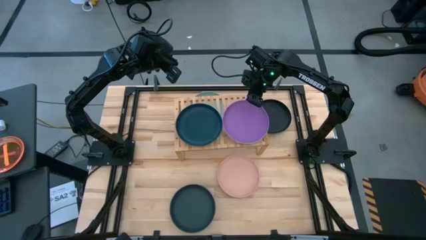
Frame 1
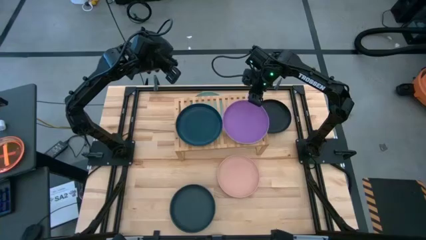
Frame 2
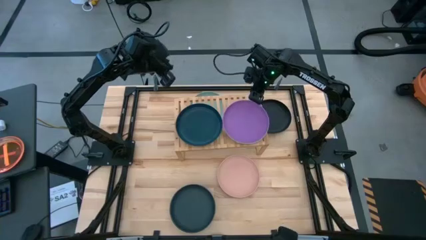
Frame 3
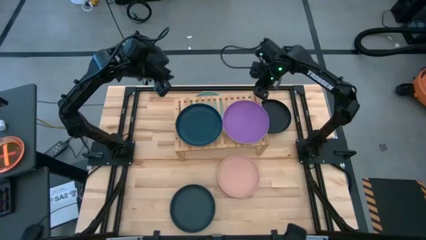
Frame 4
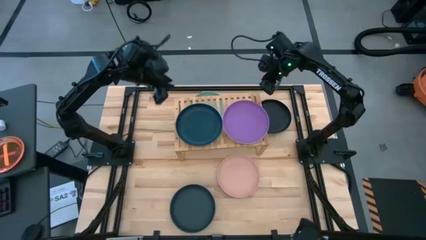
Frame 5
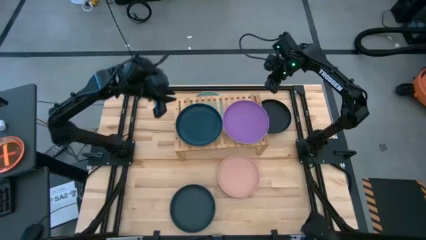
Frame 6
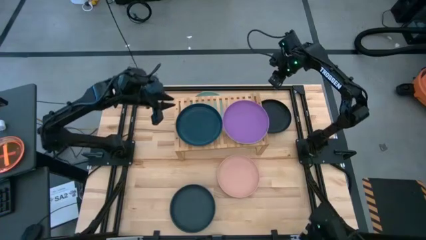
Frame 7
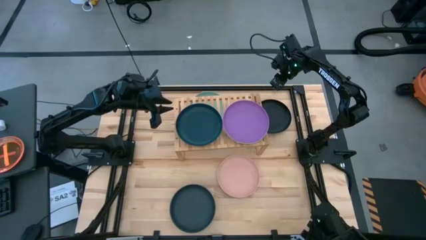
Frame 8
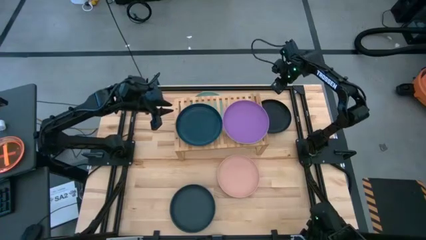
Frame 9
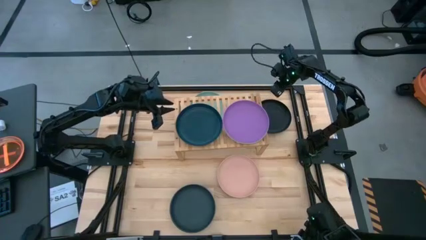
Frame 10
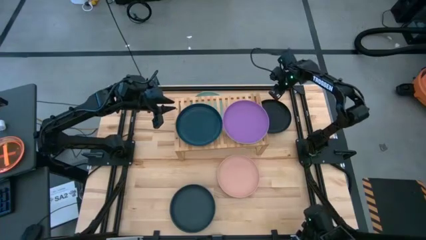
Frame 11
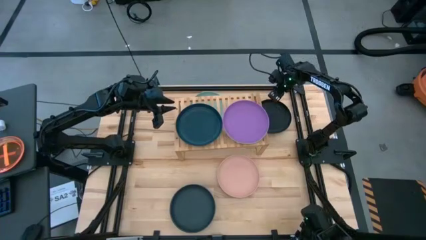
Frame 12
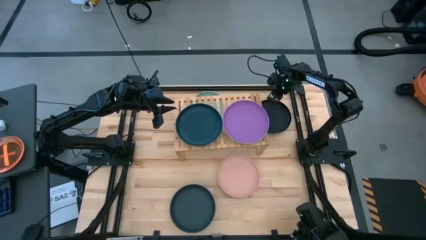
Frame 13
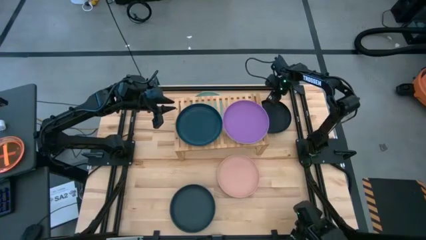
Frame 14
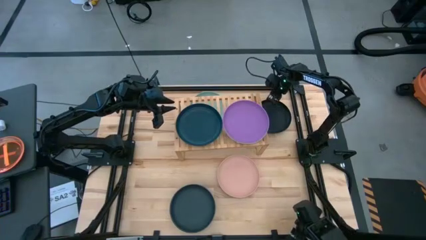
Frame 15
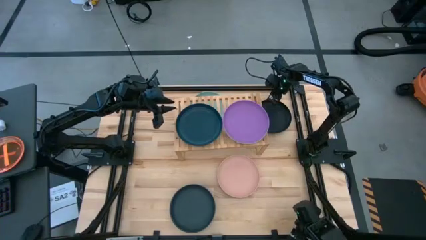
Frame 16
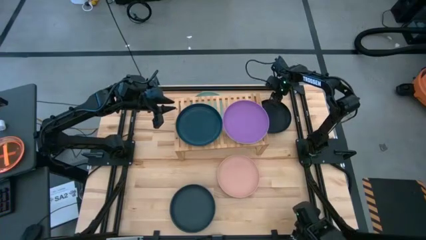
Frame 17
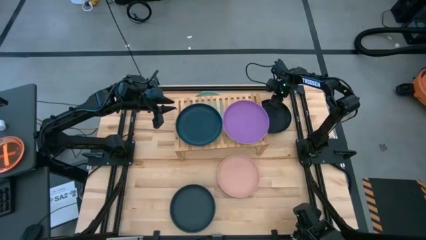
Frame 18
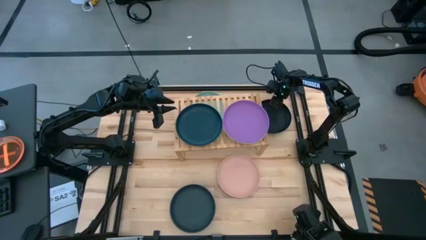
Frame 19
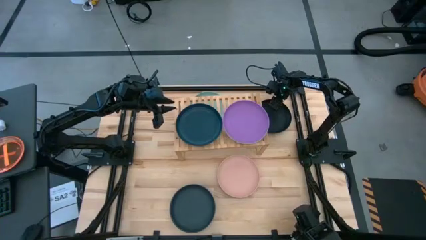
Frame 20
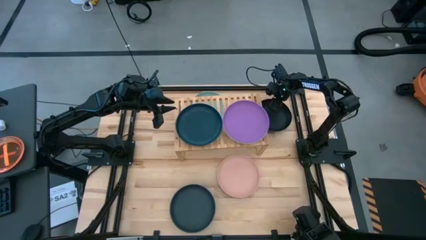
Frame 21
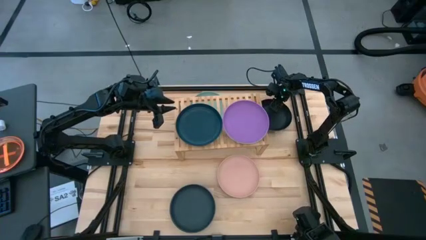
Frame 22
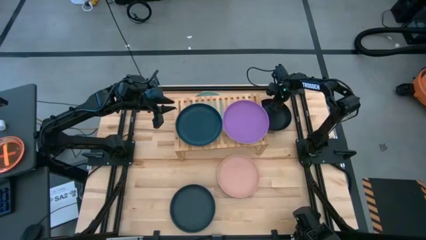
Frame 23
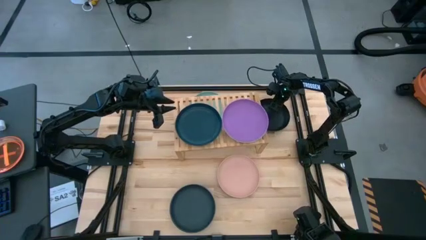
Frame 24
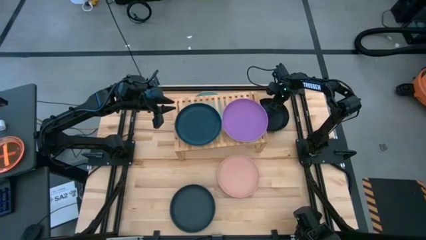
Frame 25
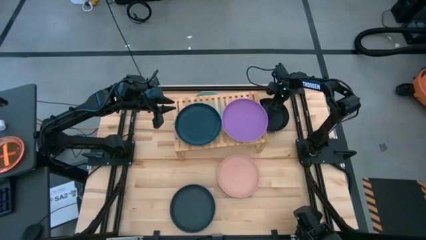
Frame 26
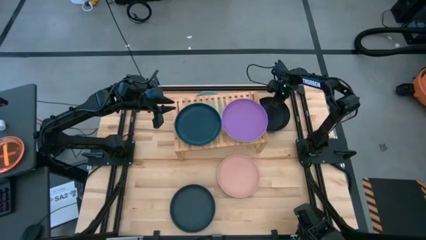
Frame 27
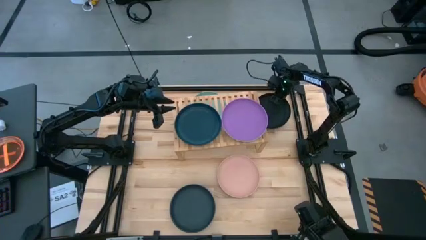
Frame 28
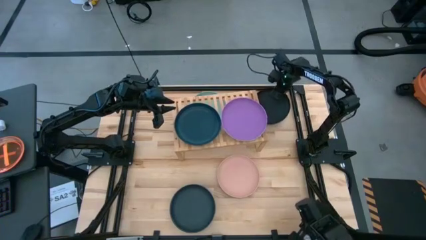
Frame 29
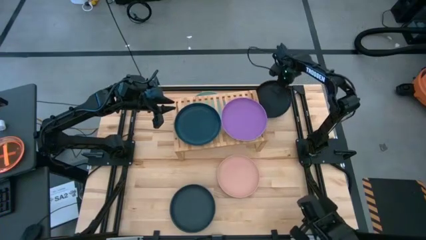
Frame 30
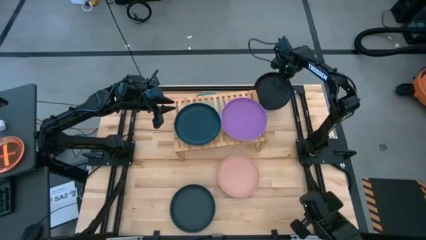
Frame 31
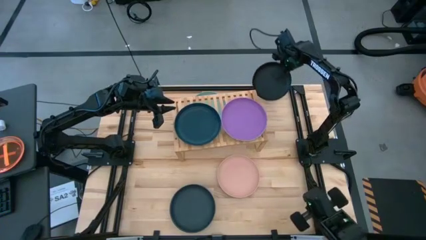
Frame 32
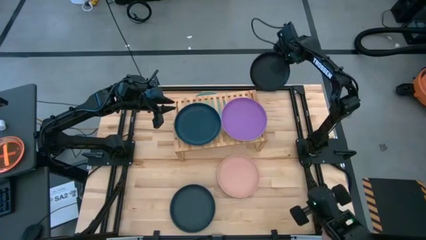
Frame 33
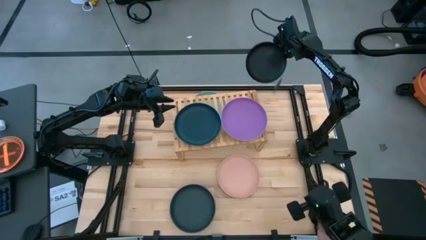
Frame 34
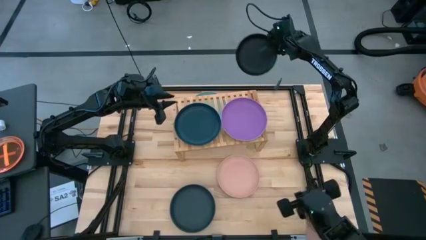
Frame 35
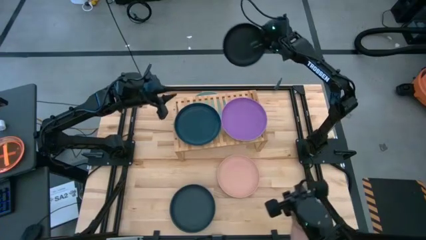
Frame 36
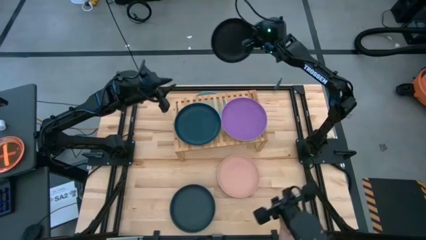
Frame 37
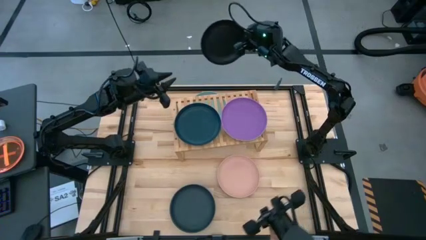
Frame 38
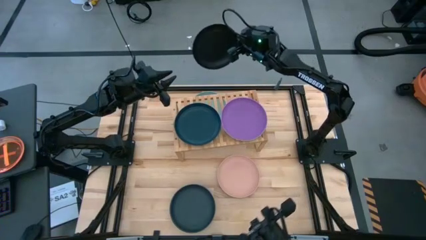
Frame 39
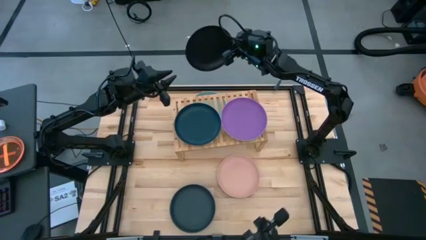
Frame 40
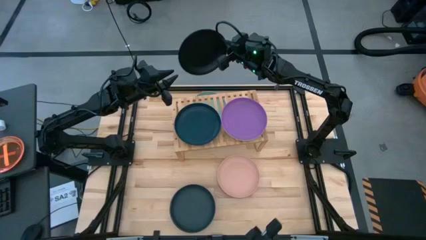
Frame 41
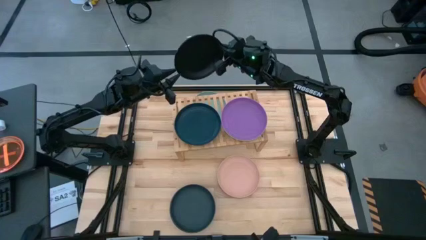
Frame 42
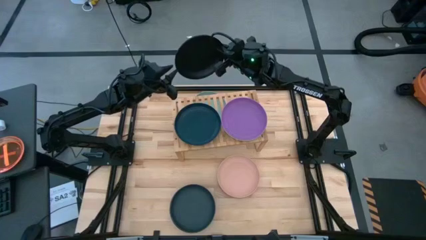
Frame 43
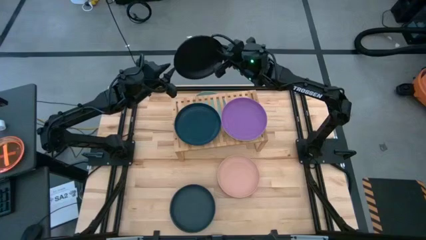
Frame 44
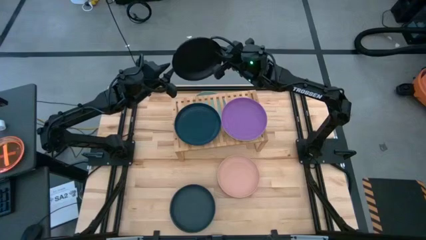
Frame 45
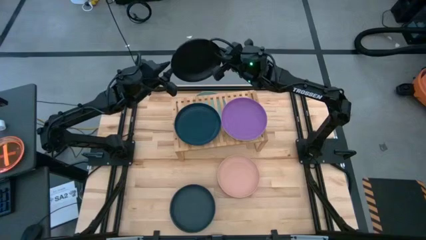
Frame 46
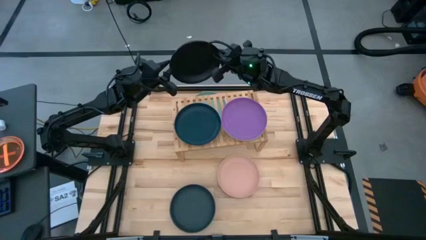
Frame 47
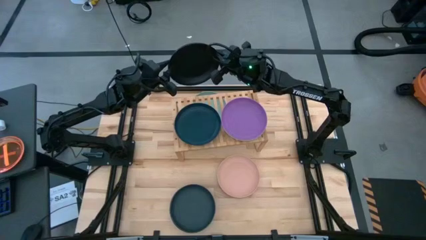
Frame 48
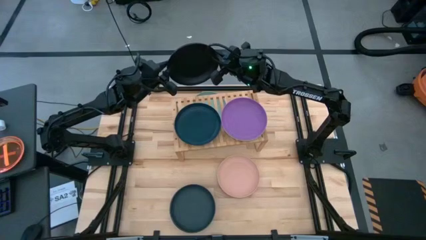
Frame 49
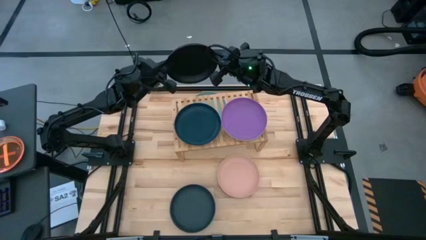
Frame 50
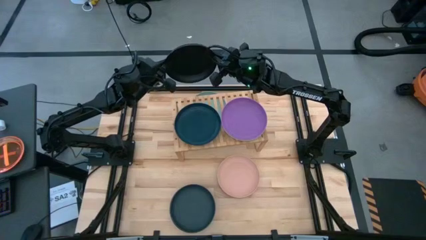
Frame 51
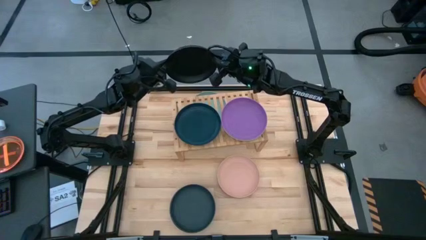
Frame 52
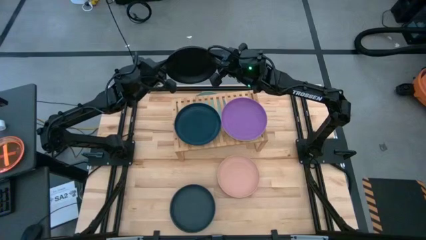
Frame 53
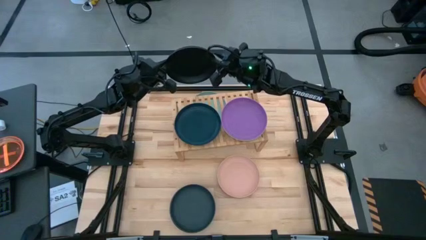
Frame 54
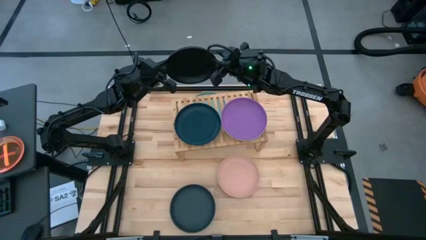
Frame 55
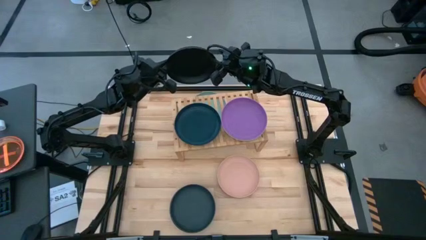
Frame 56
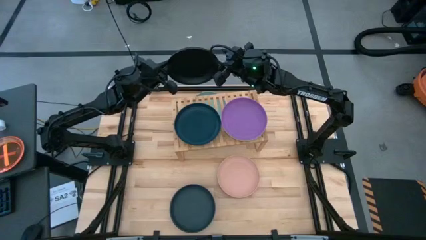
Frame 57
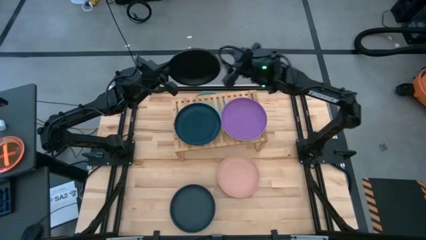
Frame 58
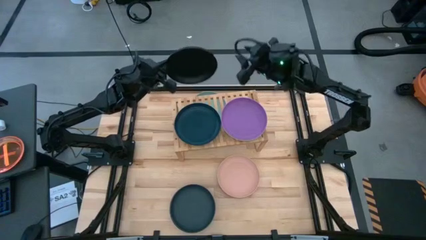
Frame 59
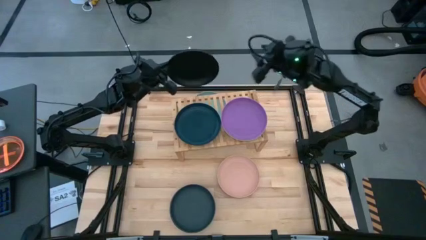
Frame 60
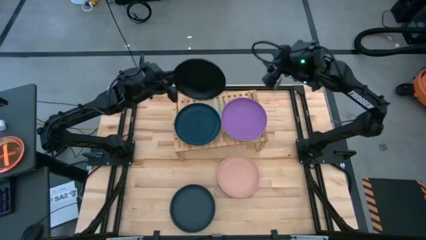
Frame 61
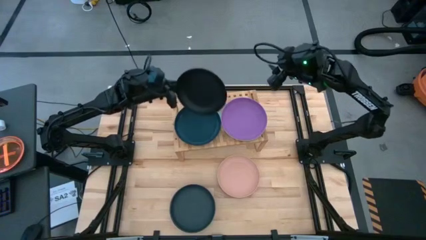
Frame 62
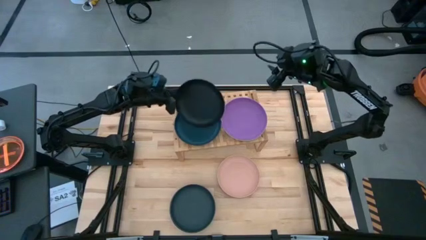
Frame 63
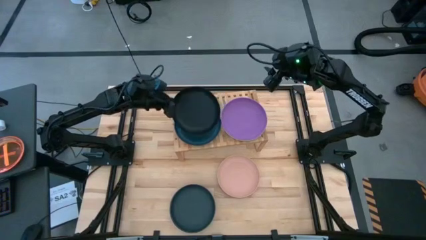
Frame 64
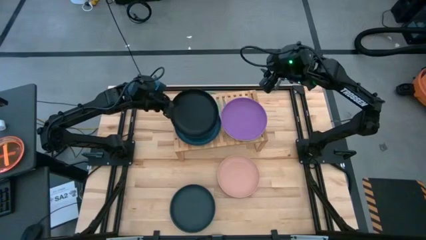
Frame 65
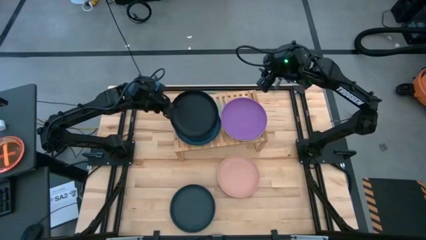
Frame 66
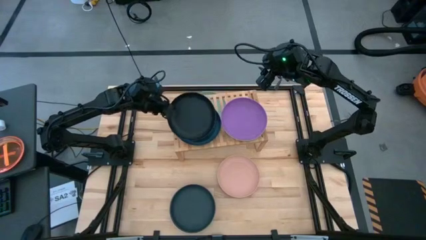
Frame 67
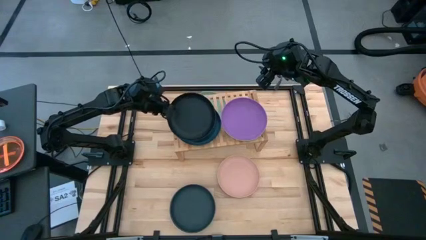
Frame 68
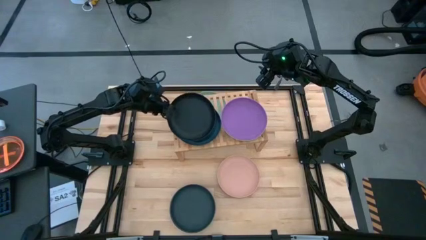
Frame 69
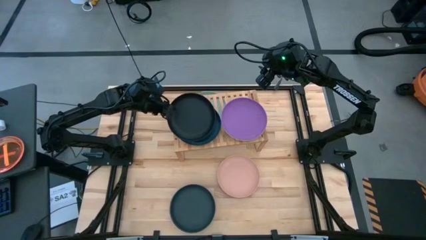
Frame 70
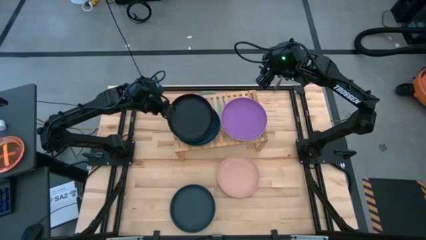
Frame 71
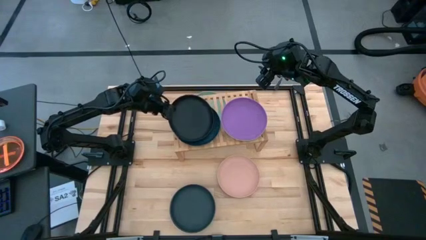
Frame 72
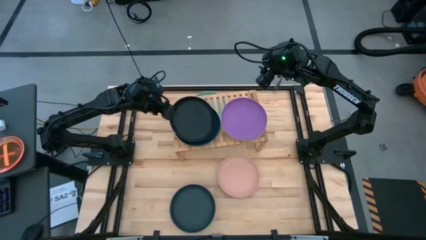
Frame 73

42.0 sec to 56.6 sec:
Task: Place and stack plates onto a shelf
Stack the top black plate on top of the black plate on the shelf

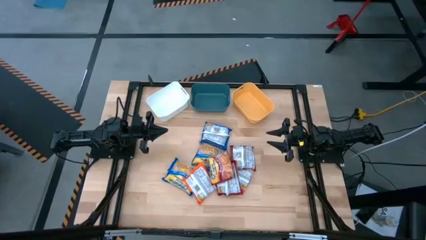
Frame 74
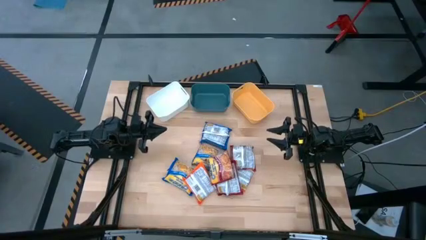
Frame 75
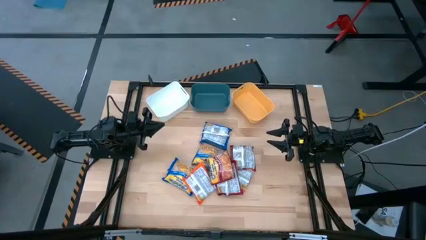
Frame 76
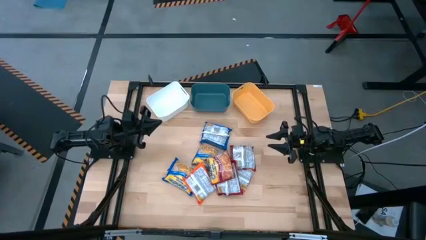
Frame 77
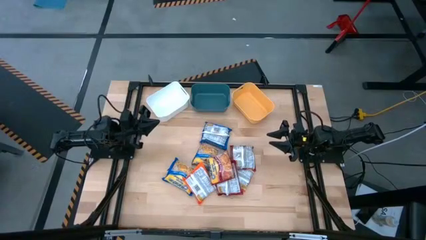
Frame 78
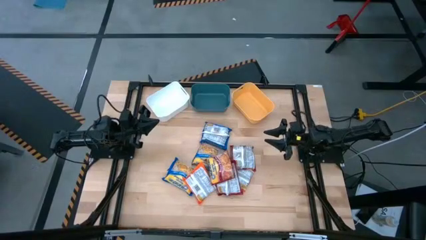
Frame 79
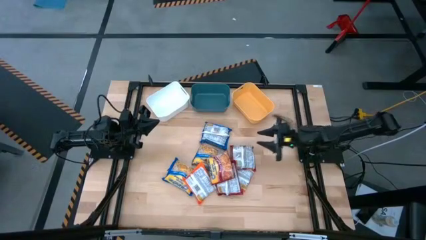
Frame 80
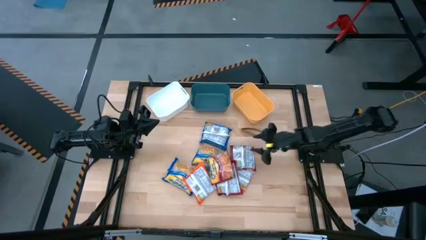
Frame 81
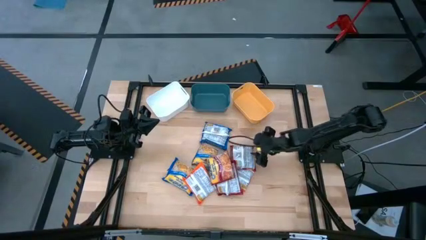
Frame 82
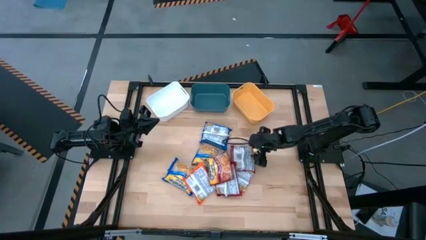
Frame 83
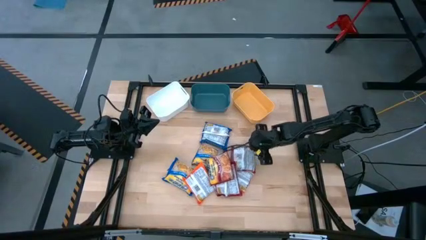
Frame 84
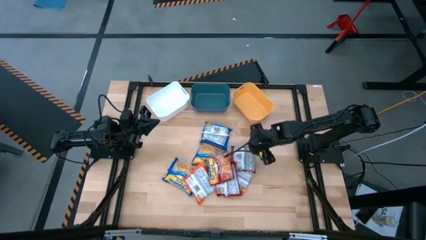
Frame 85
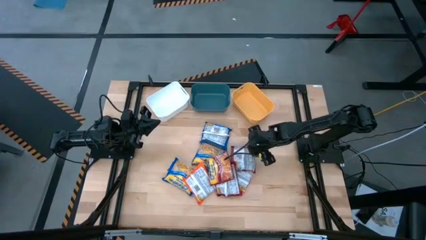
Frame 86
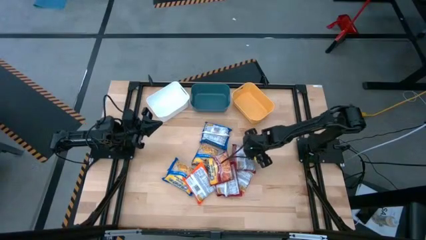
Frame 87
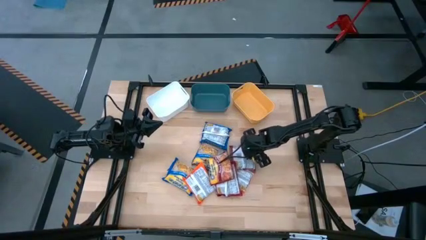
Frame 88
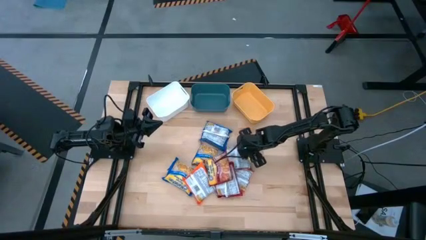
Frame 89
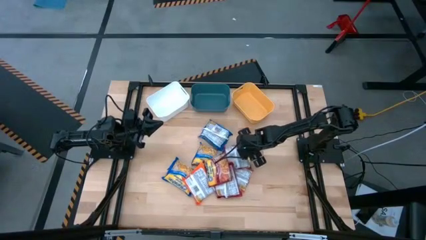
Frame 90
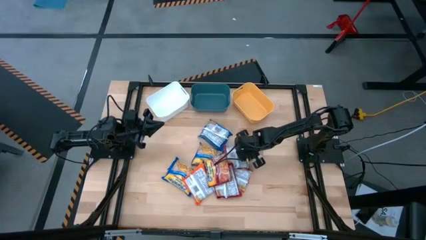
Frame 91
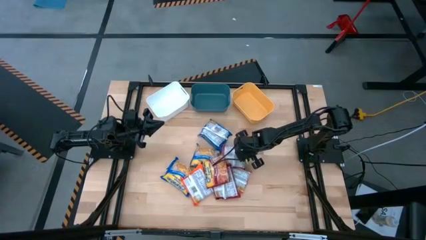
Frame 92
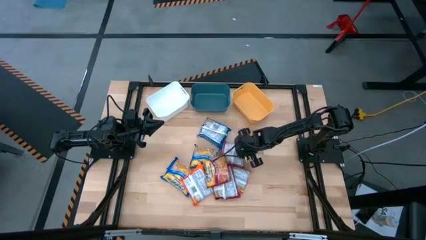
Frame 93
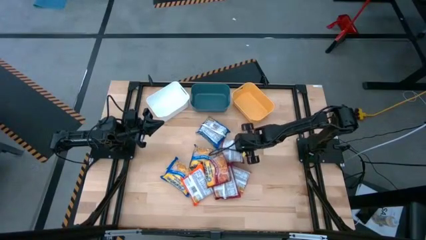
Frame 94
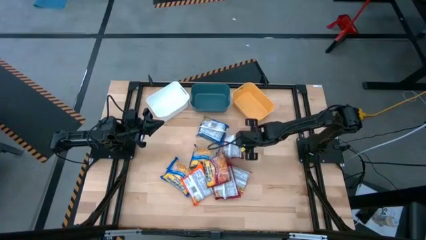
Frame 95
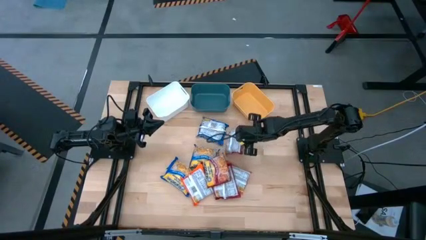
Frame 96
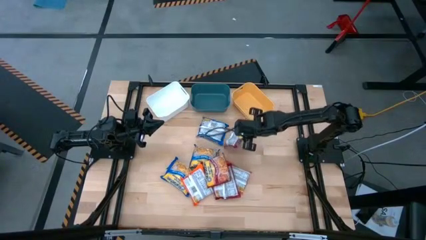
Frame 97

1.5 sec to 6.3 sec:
Task: Sort Maruchan noodles
Put the top red noodle pack into the yellow bin
